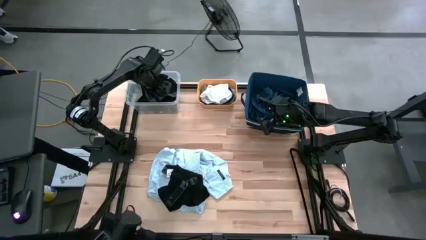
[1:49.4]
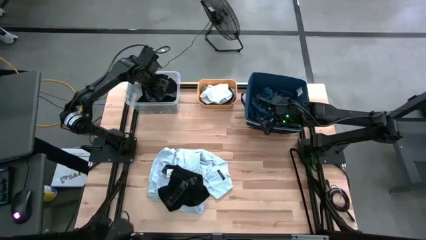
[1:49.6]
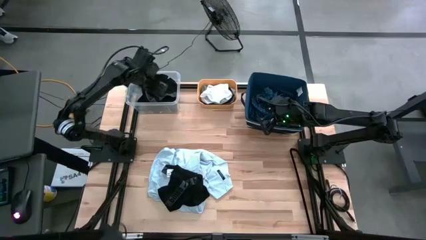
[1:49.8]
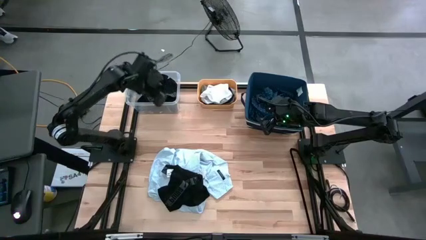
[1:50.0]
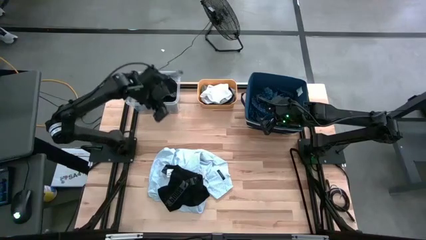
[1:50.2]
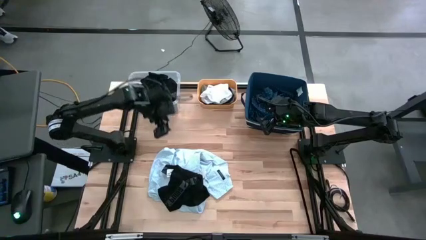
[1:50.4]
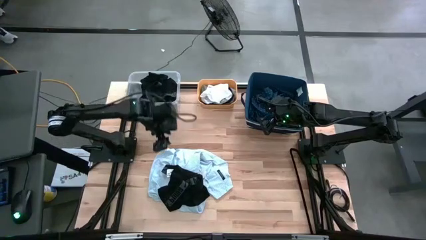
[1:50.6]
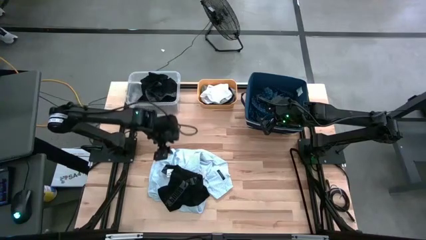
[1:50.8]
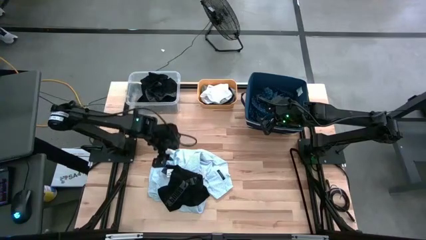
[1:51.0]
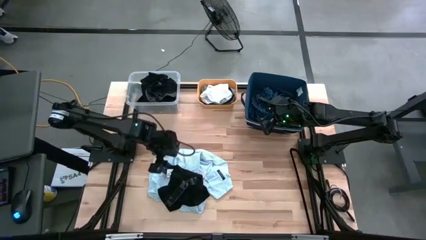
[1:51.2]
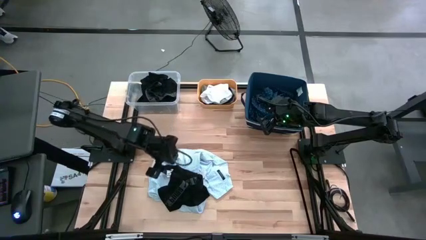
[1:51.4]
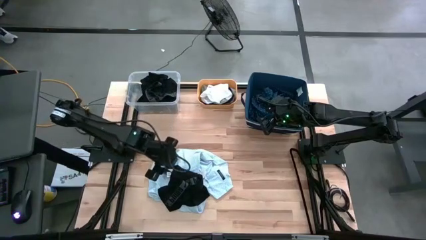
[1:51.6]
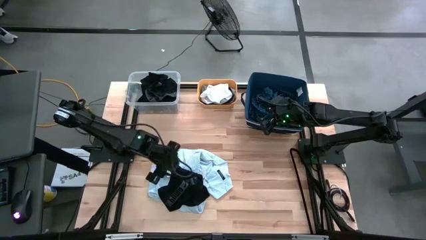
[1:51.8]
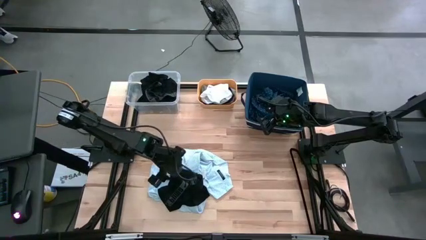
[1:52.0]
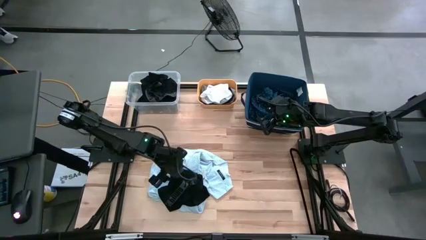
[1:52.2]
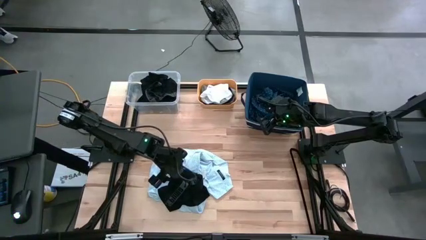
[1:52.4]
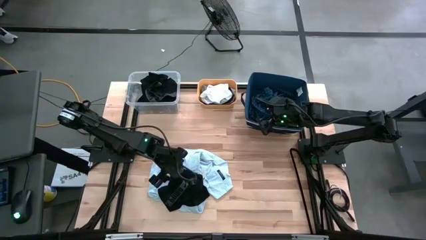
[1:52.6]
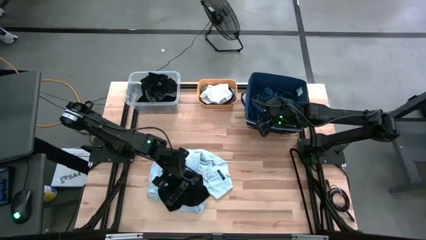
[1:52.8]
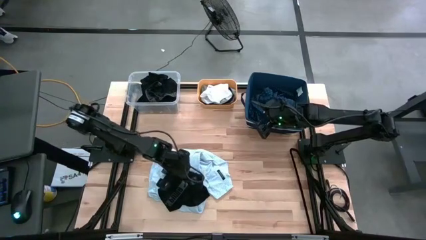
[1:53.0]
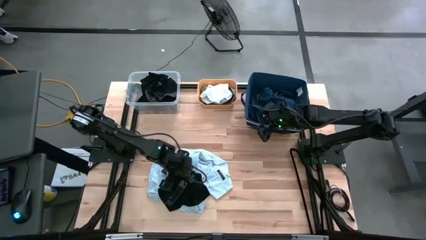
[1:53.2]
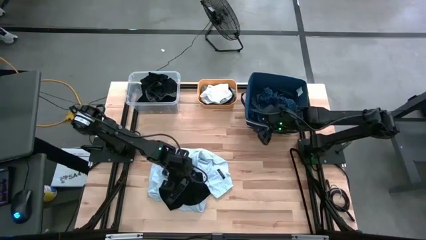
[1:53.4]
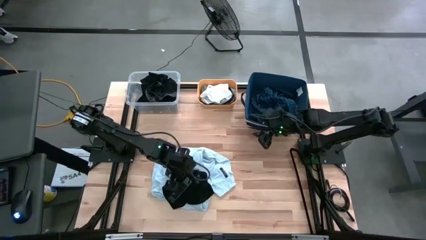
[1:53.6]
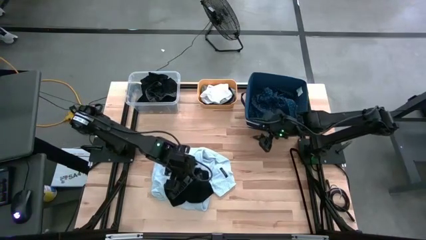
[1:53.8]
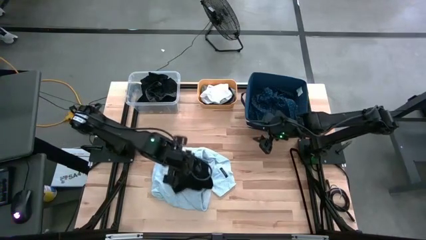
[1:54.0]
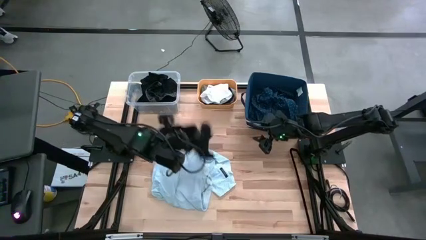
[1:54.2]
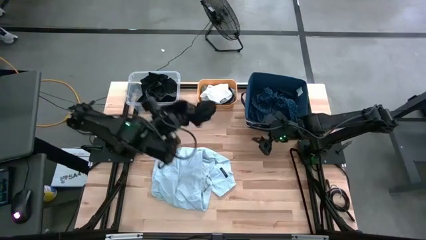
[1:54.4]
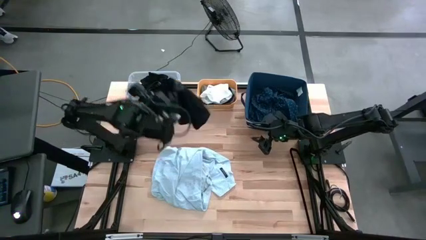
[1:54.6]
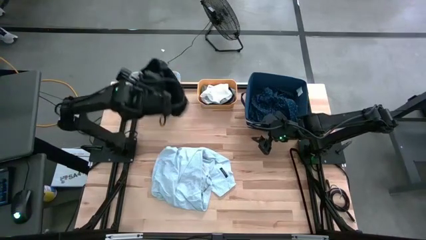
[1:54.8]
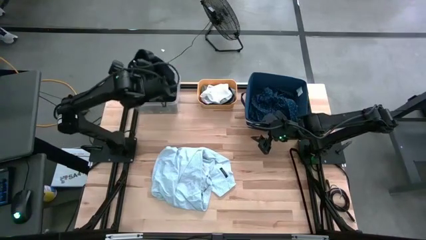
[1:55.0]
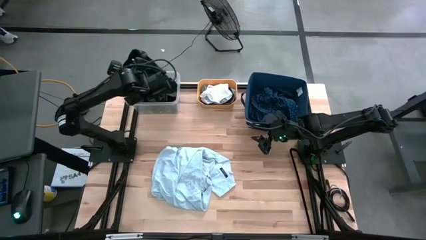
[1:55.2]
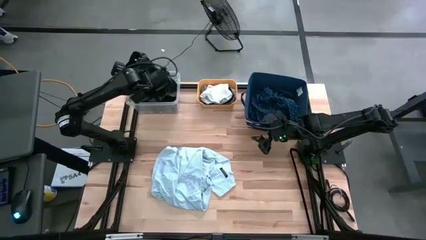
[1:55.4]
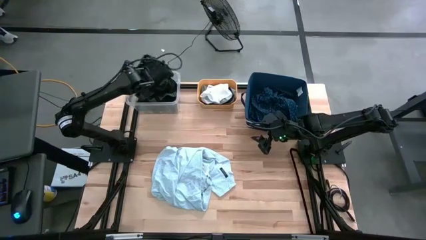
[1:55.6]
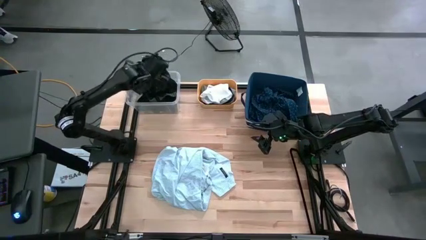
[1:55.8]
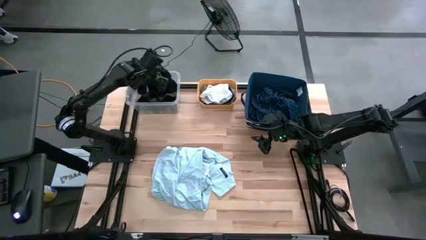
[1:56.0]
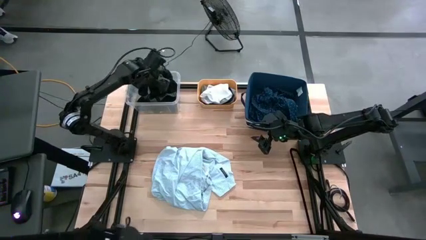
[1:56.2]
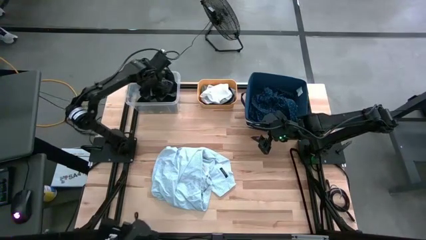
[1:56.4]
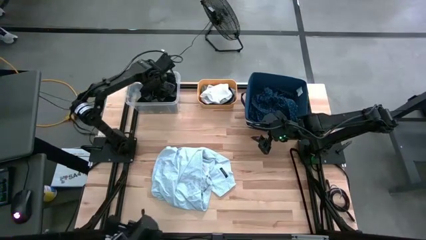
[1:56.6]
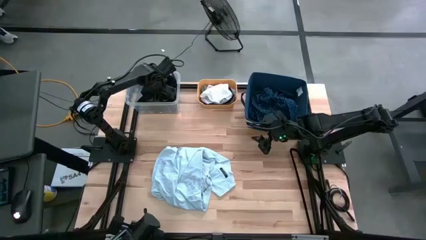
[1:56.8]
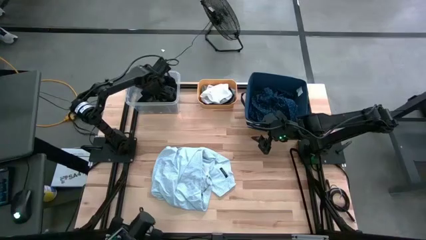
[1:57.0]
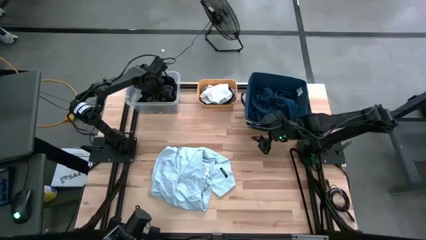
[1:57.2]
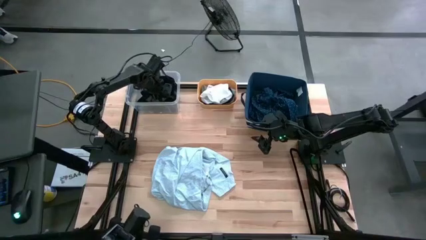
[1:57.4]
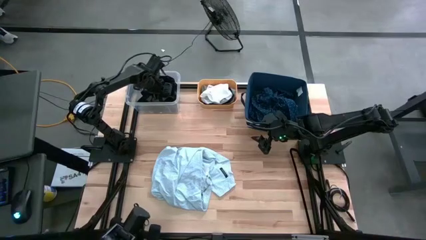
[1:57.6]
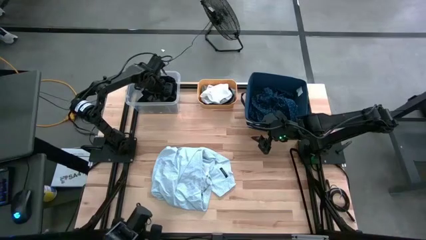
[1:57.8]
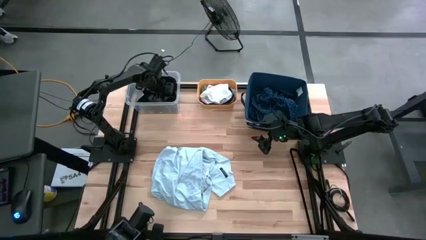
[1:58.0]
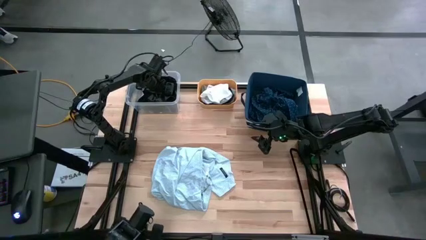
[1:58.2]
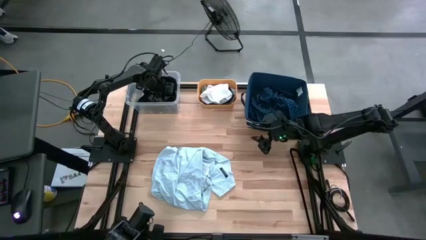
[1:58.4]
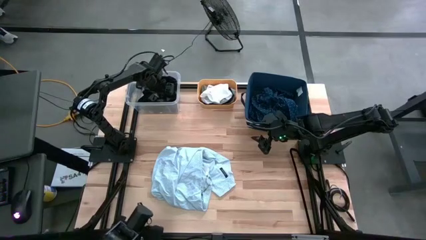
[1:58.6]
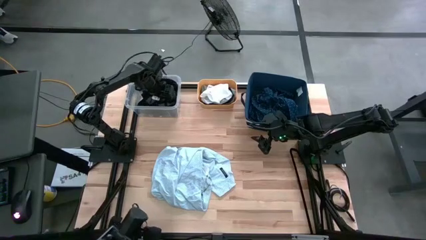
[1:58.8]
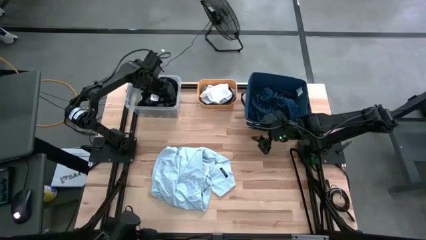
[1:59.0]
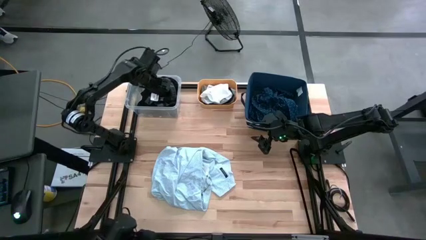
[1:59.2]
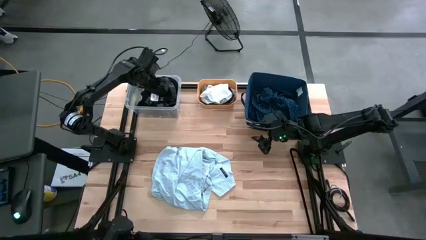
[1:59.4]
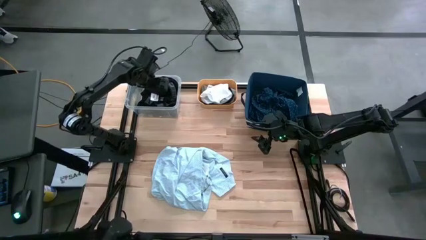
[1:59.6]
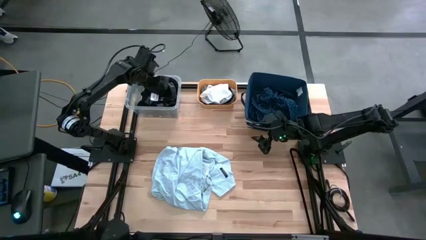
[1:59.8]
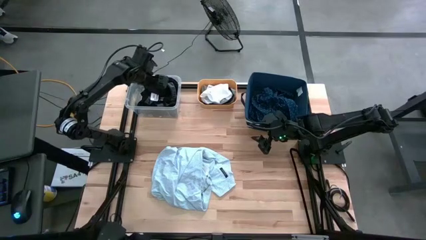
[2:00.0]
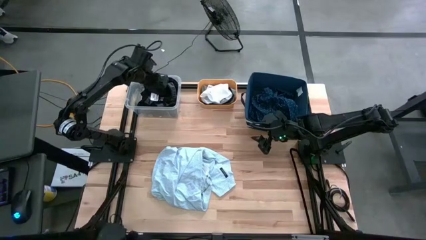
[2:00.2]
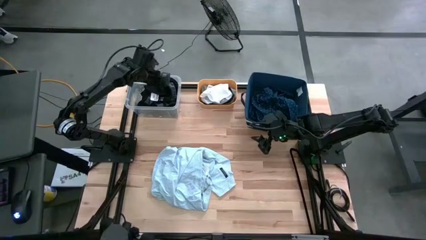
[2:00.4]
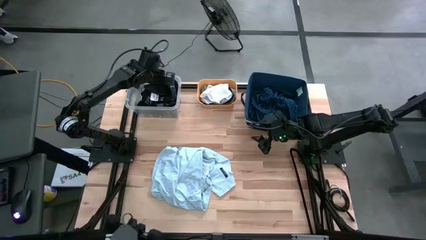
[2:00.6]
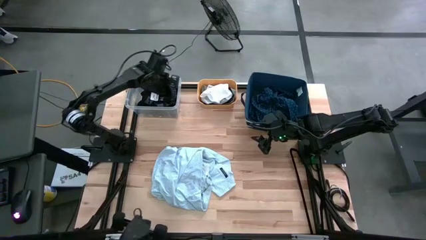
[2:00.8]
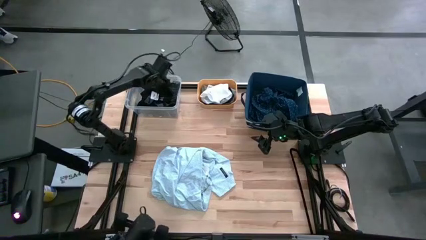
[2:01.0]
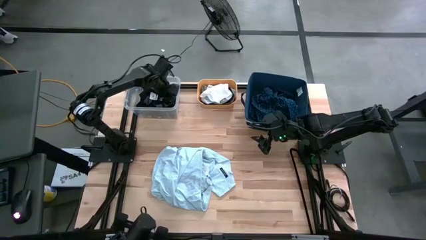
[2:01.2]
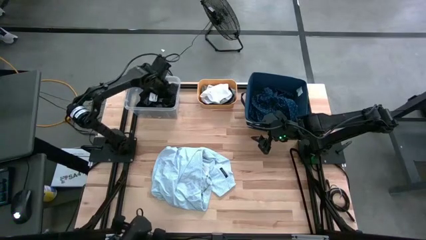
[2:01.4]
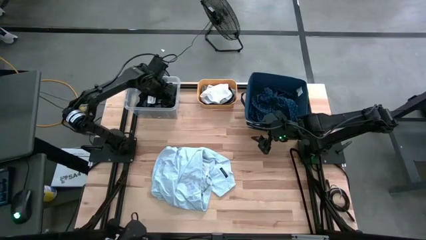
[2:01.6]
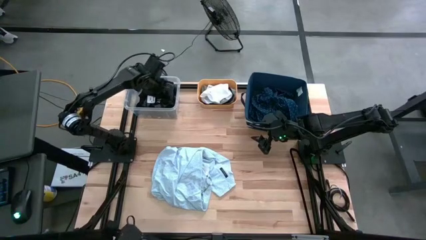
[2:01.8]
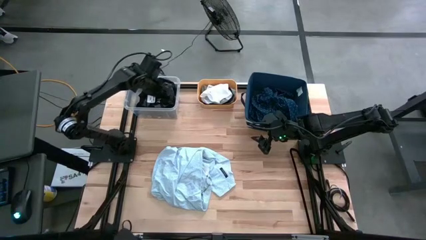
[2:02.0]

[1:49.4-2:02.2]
Task: Pick & Place Cloths
Put the black underwear into the transparent bin
